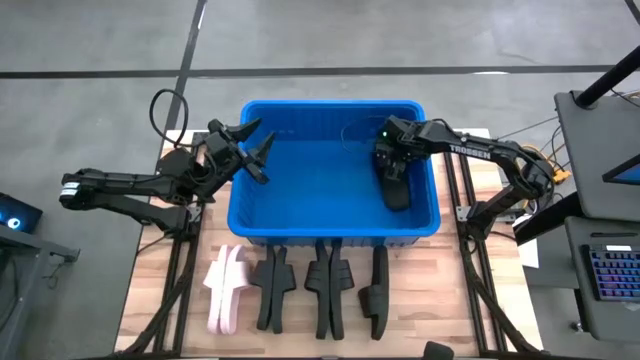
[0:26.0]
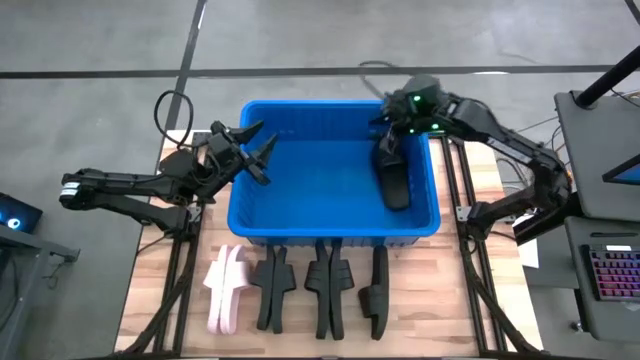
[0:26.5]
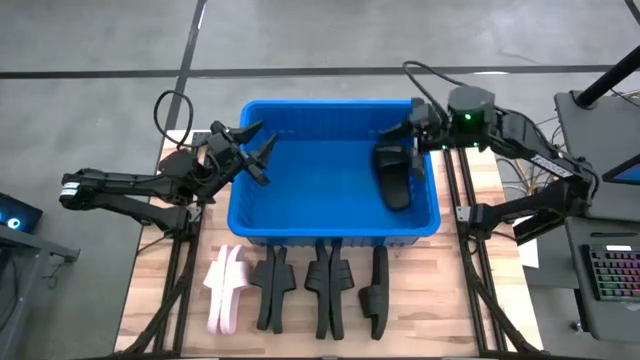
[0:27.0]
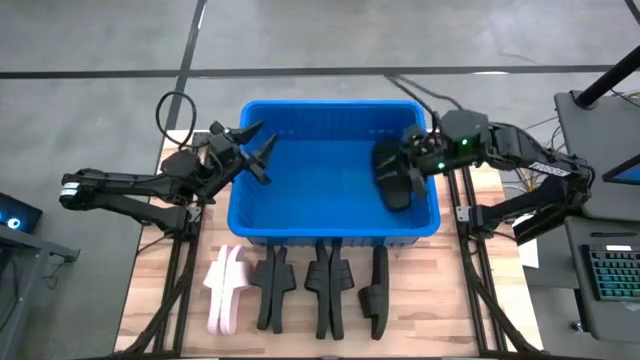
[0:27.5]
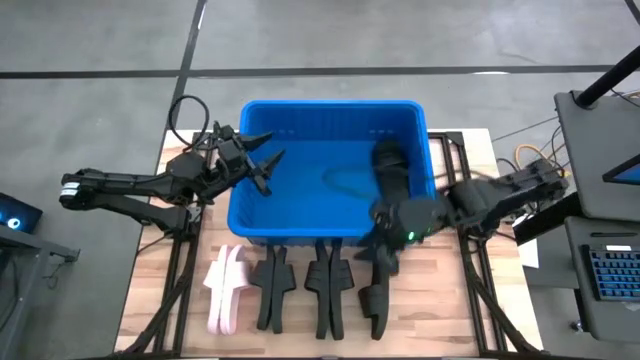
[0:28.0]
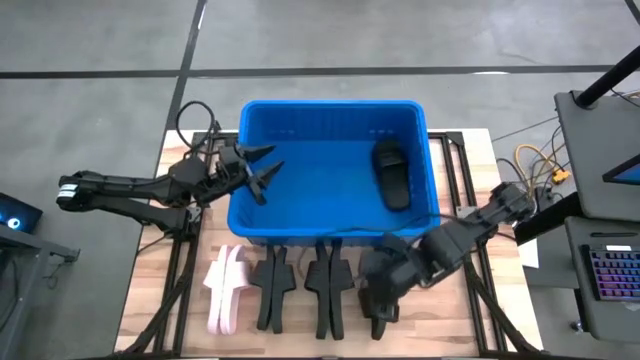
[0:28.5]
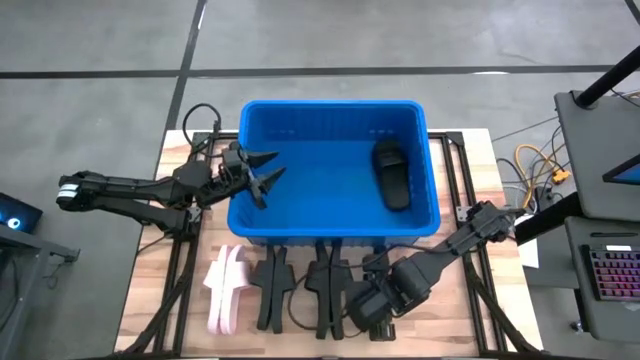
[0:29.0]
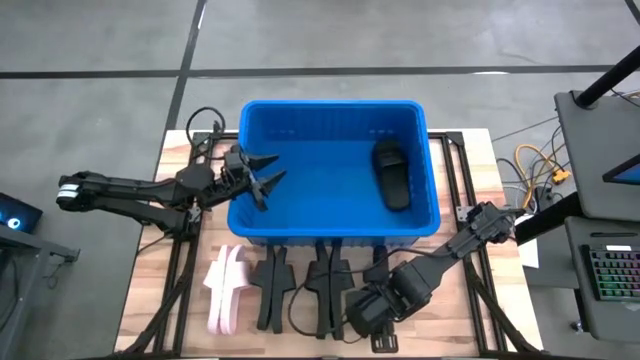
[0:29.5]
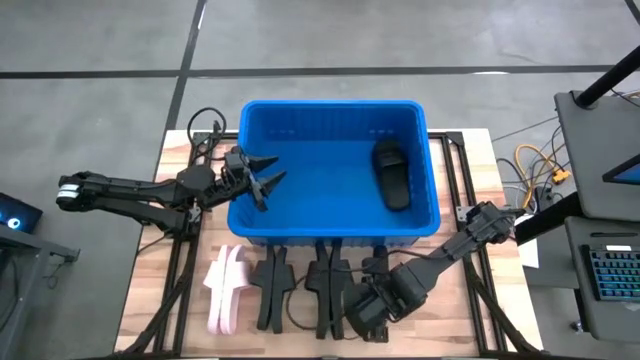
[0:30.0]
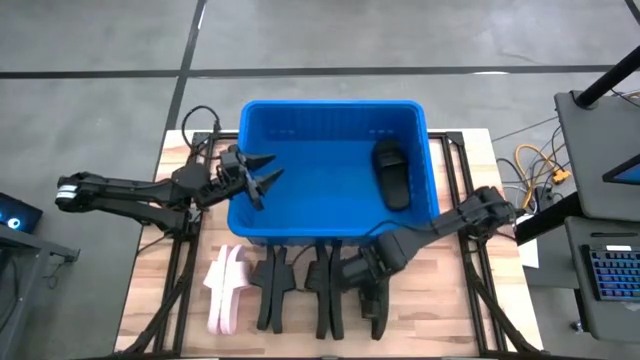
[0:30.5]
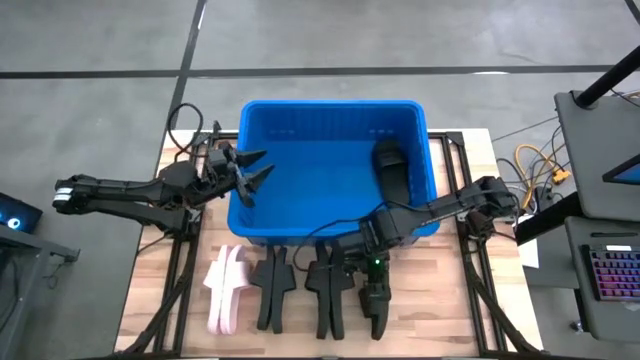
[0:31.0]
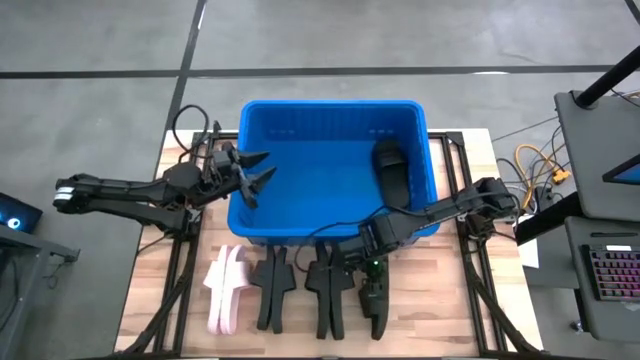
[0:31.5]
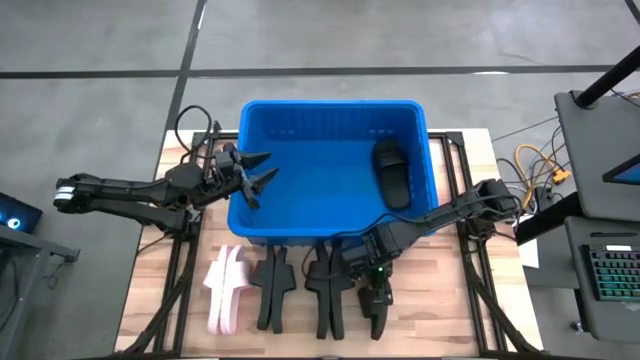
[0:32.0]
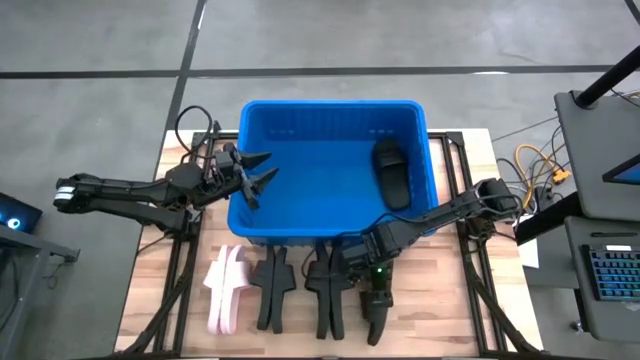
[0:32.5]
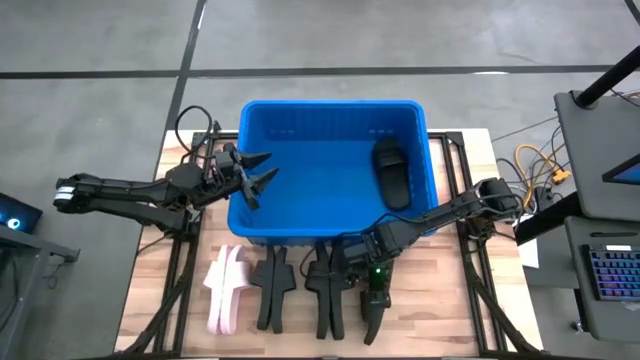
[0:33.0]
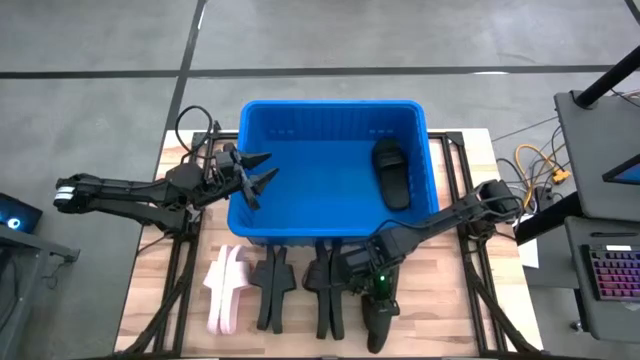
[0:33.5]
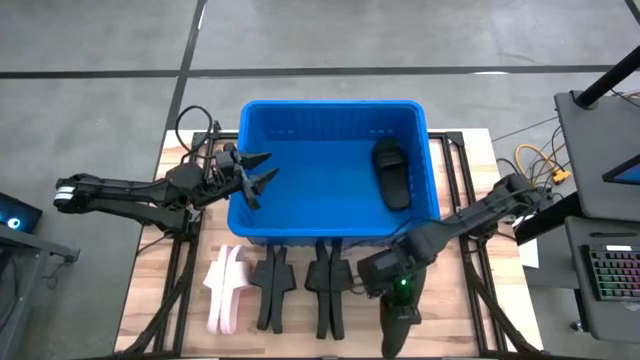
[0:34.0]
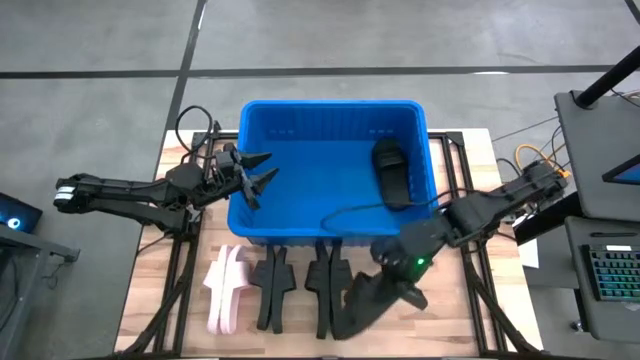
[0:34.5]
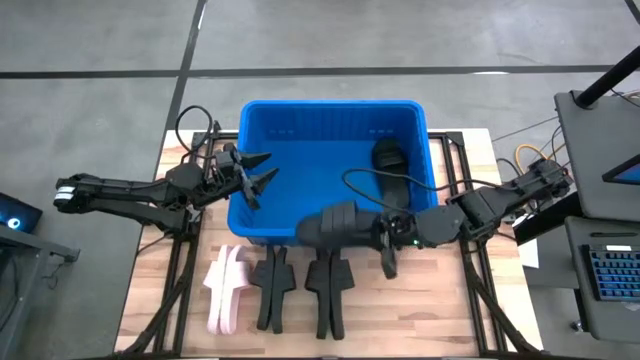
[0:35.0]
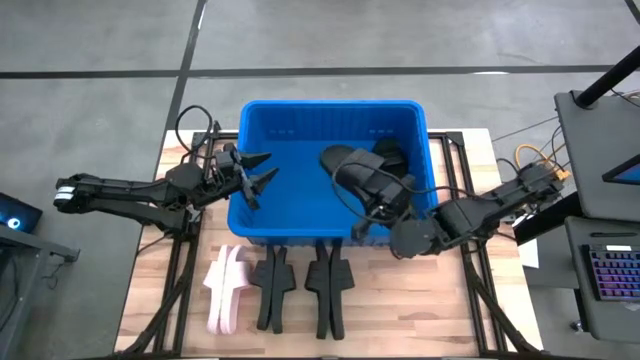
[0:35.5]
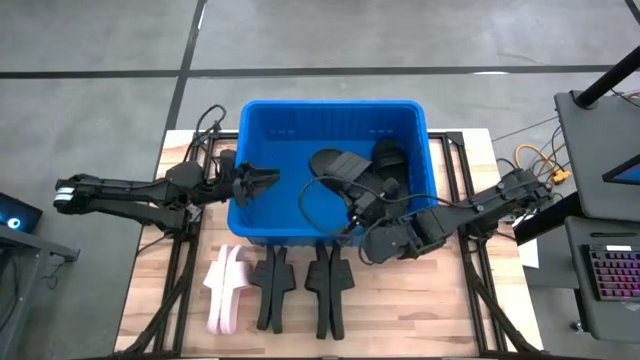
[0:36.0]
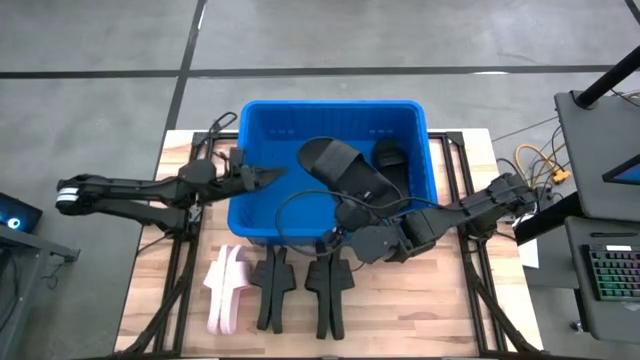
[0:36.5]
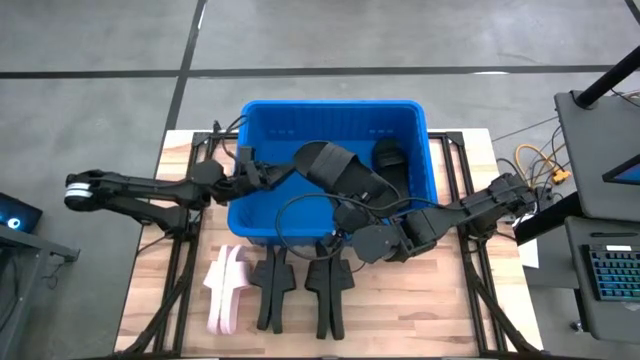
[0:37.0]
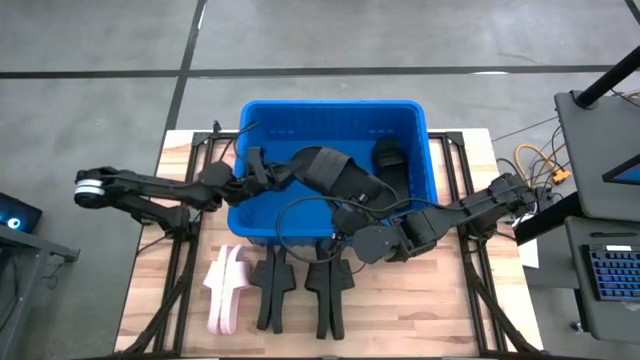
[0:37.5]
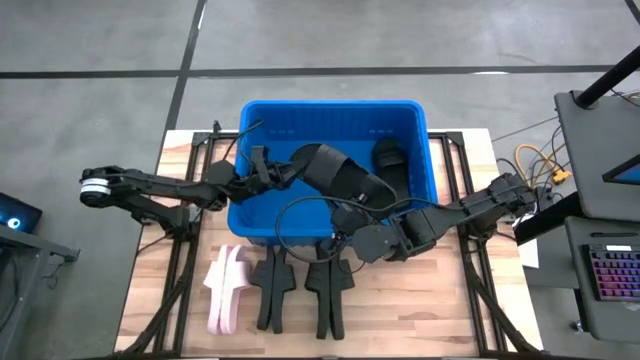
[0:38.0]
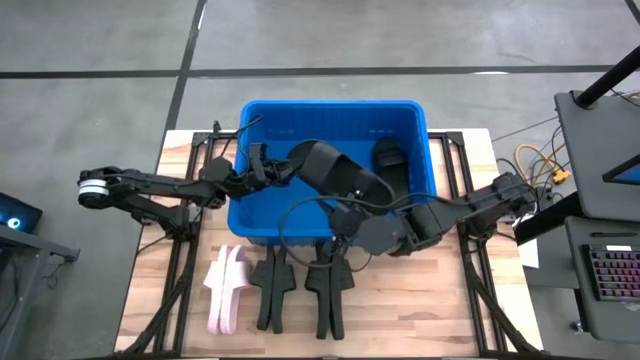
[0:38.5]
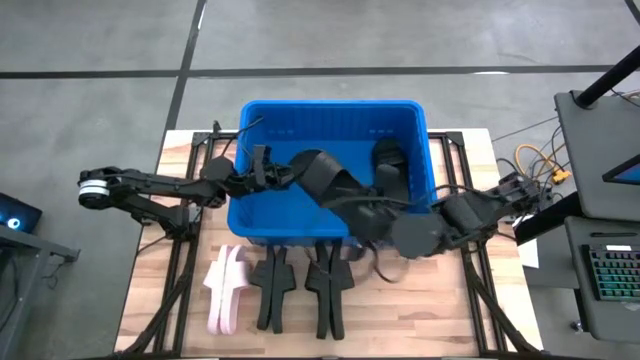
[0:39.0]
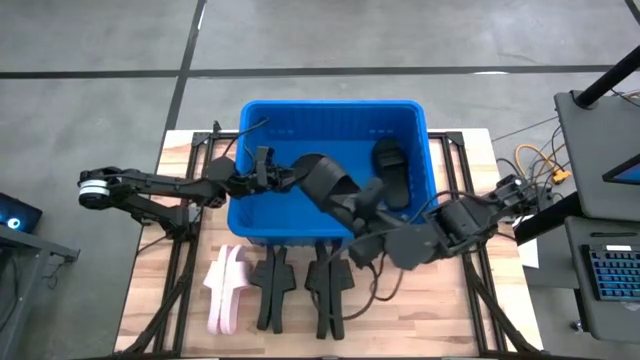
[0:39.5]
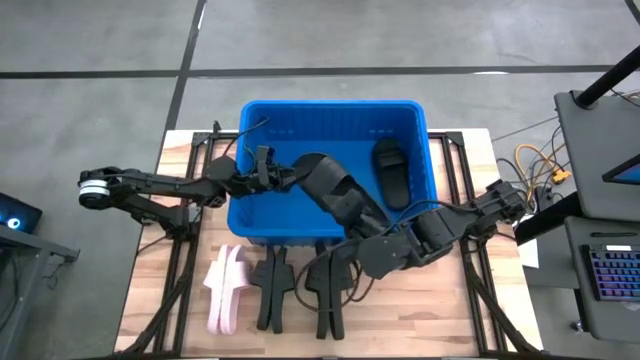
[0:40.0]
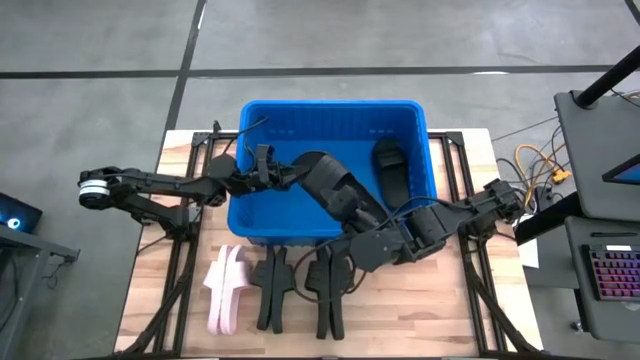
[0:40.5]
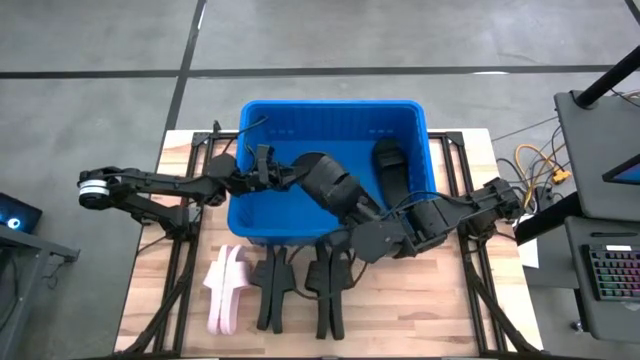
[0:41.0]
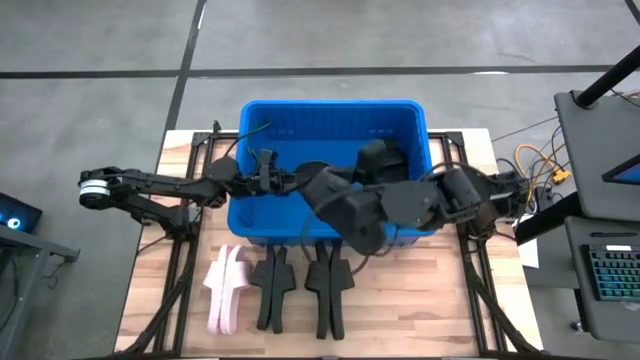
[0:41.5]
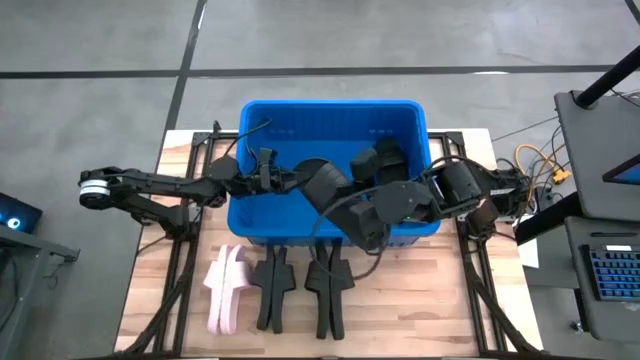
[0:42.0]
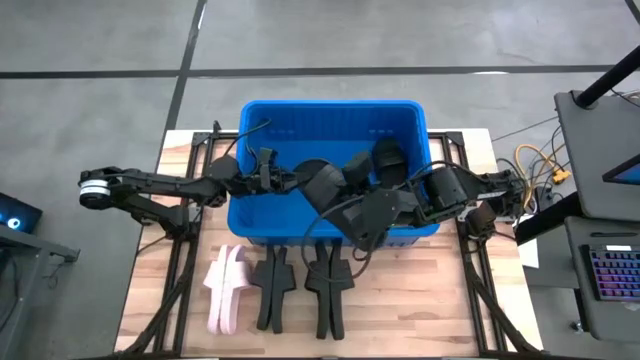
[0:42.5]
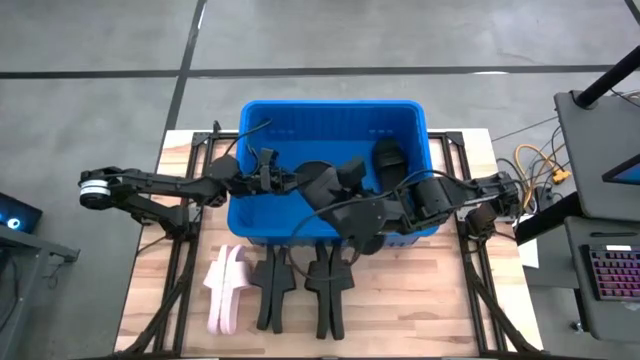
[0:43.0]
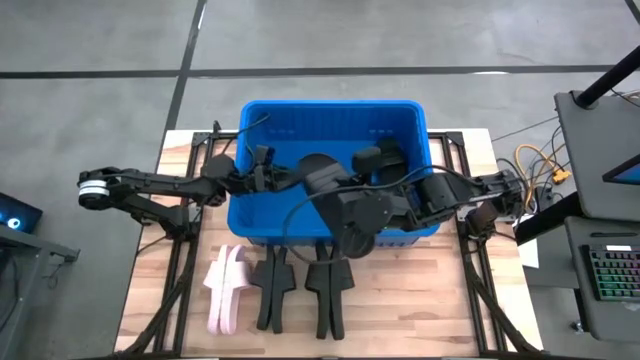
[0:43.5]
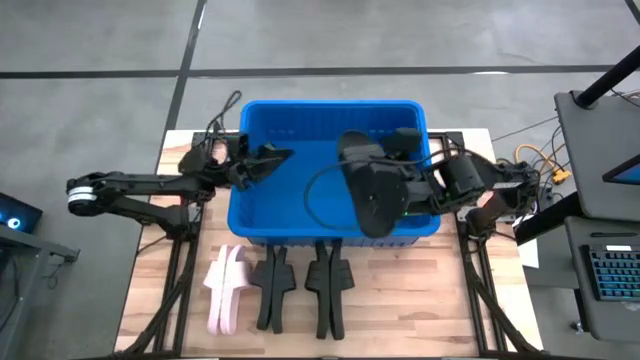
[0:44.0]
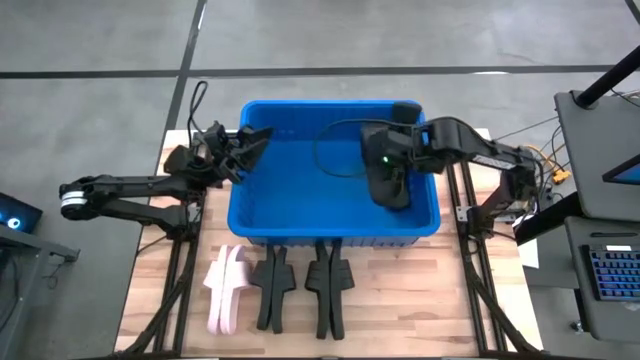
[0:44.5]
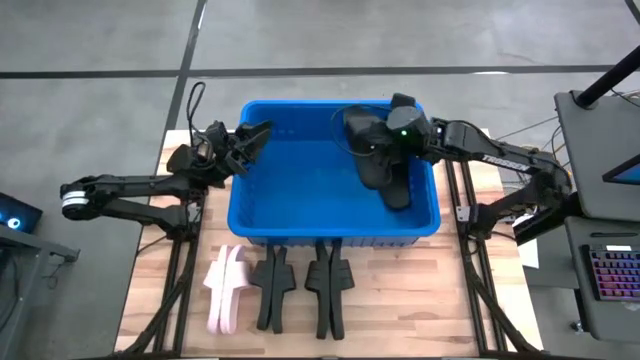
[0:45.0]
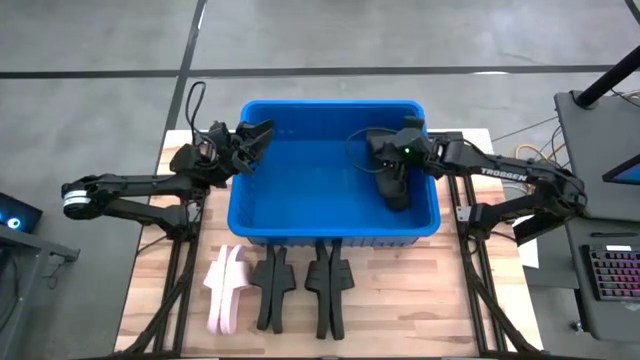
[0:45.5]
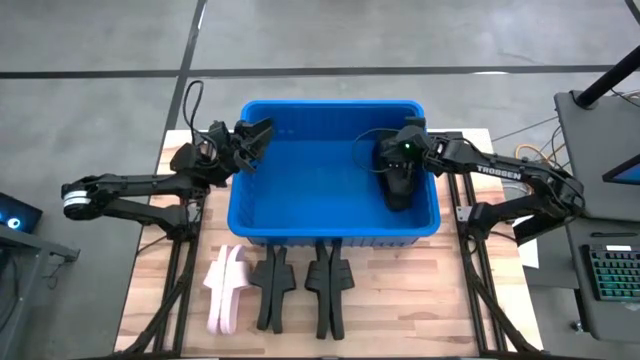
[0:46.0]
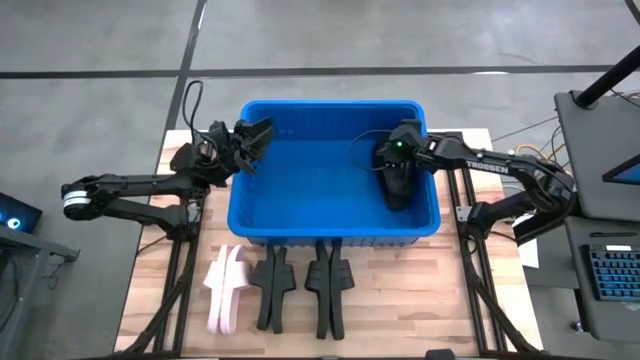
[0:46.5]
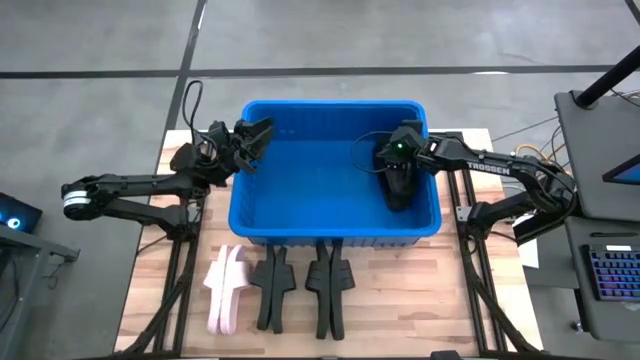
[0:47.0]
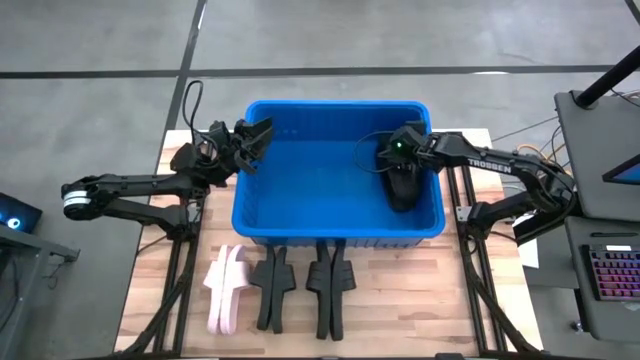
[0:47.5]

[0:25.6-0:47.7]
Task: Pick and place slides into bin
Put the black slide into the bin
